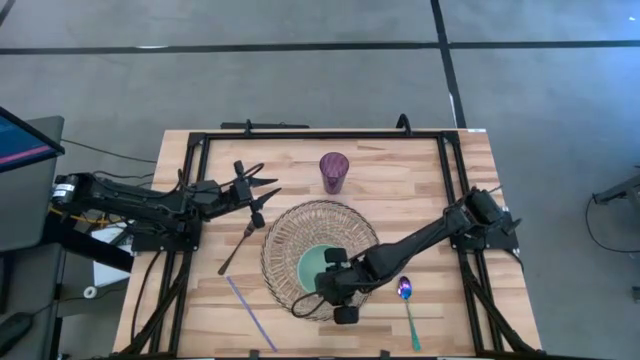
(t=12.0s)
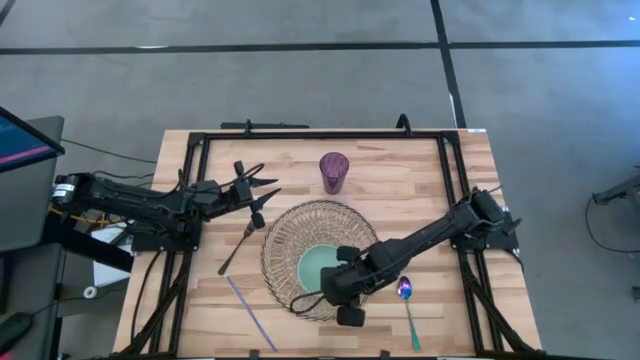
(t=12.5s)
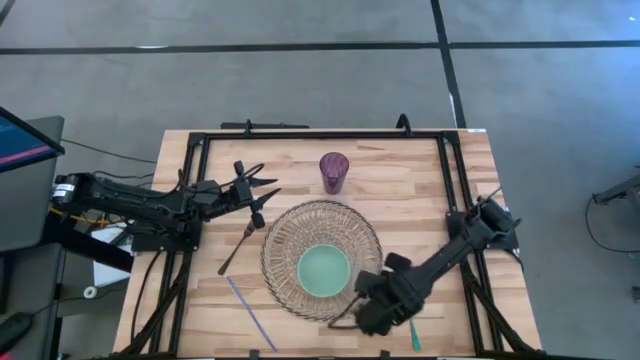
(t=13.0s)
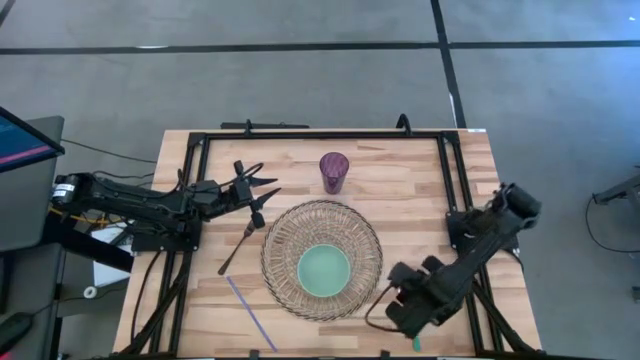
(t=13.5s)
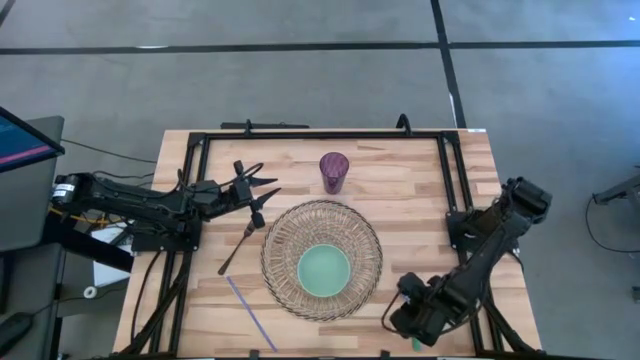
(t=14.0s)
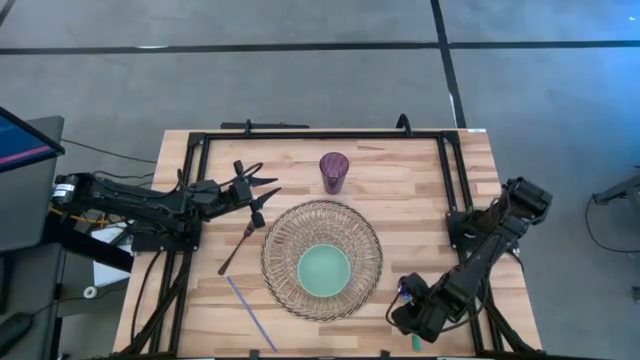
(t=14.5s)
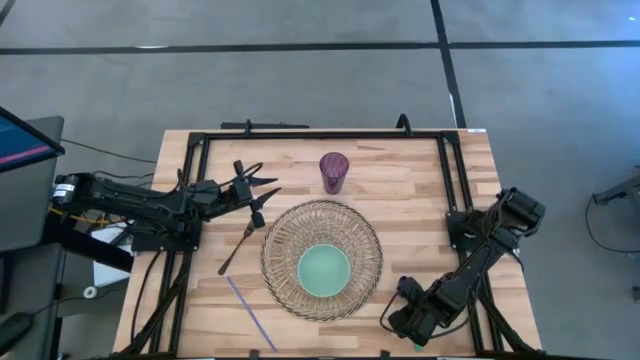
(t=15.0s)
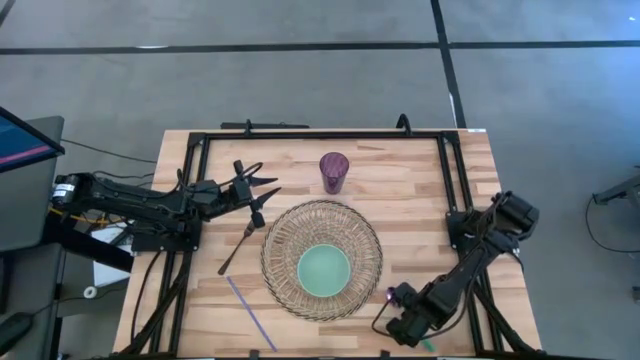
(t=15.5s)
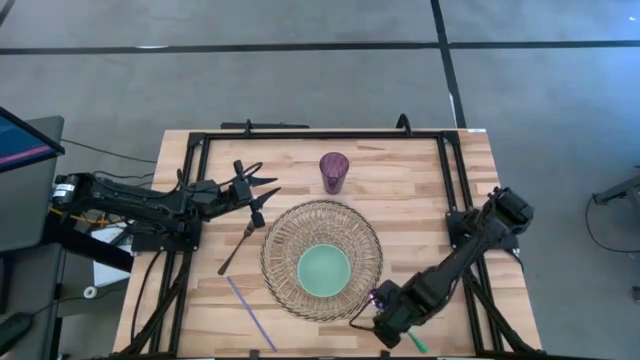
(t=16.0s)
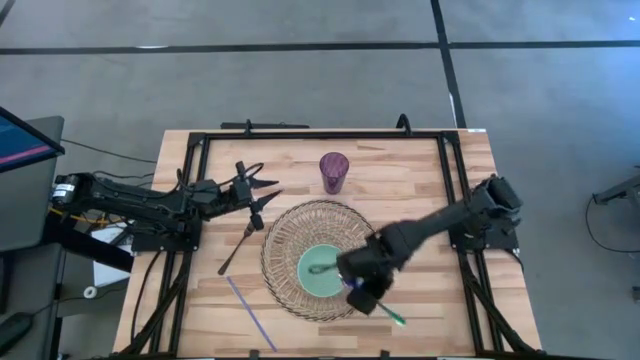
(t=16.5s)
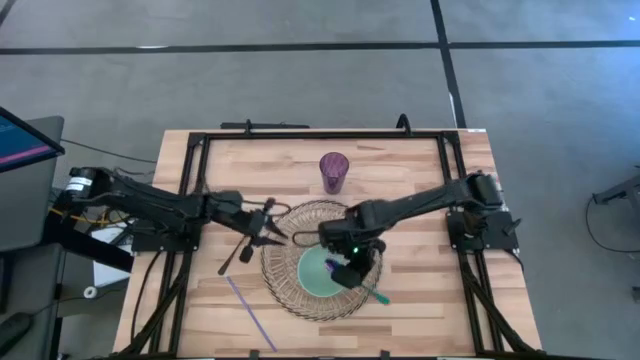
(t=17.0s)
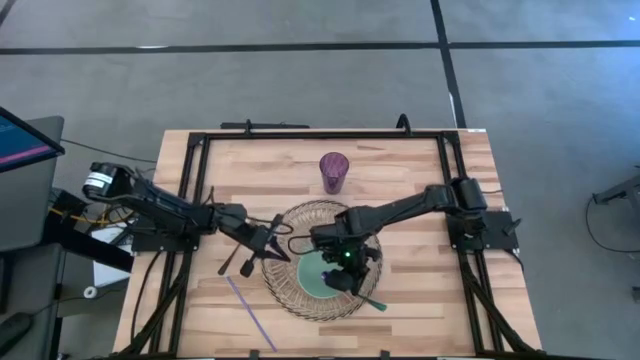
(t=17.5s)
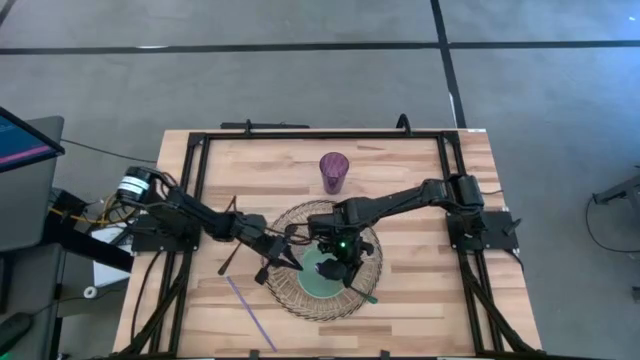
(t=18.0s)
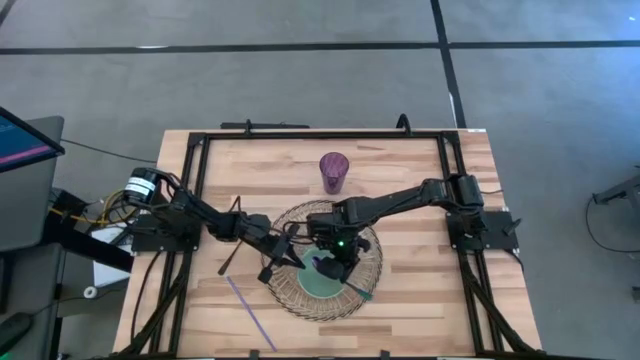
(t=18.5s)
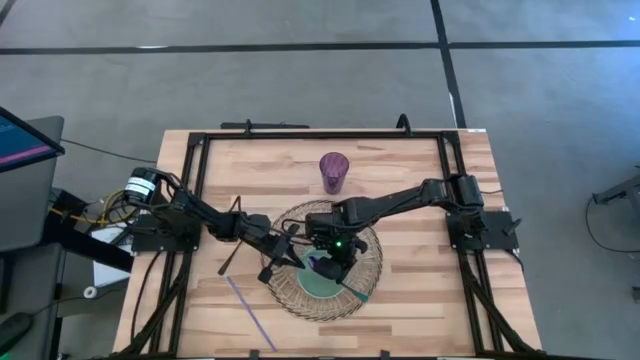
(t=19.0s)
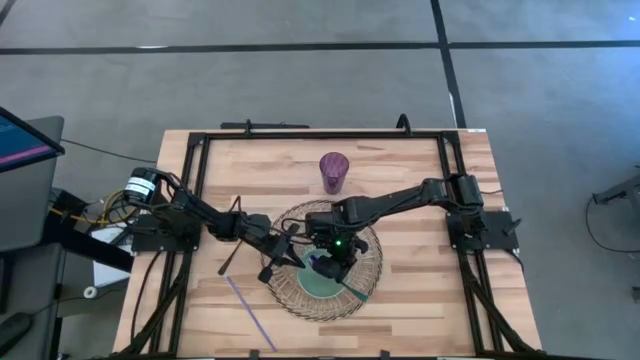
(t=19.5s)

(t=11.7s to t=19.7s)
Task: Pick & Place Utensil
Put the blue spoon into the green bowl

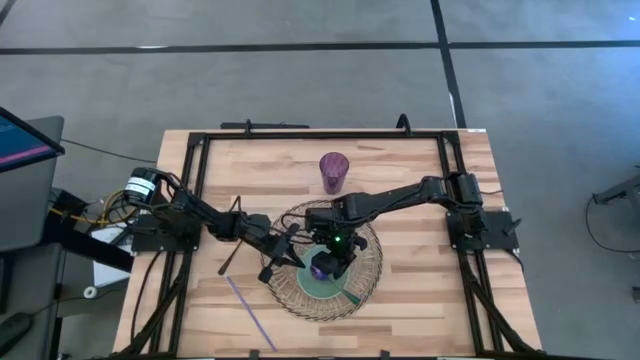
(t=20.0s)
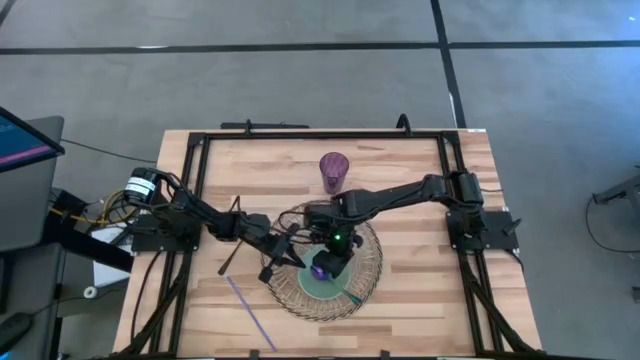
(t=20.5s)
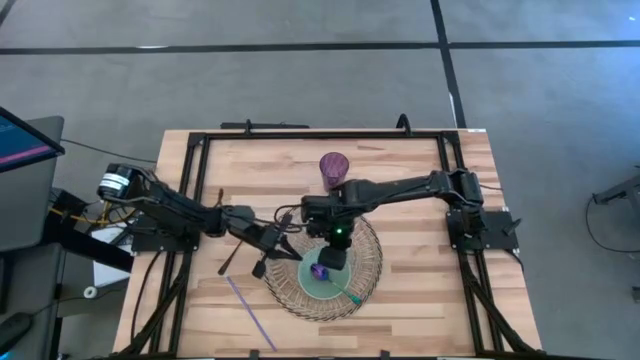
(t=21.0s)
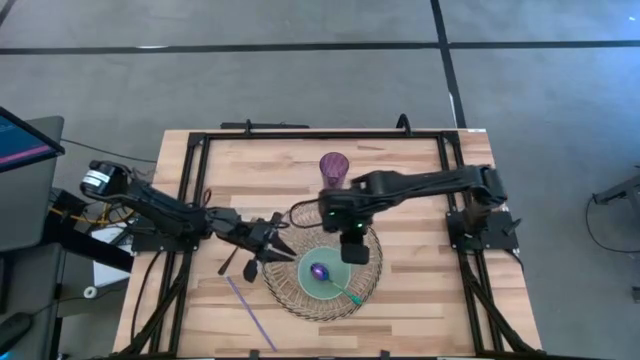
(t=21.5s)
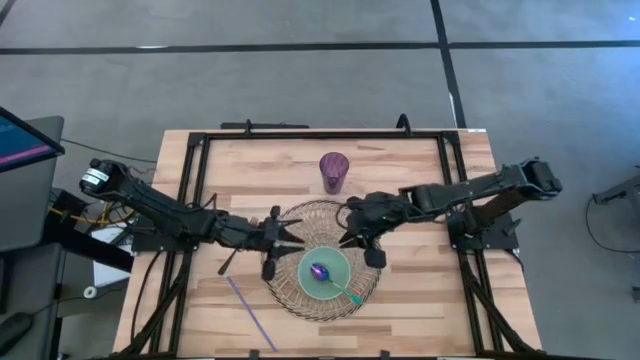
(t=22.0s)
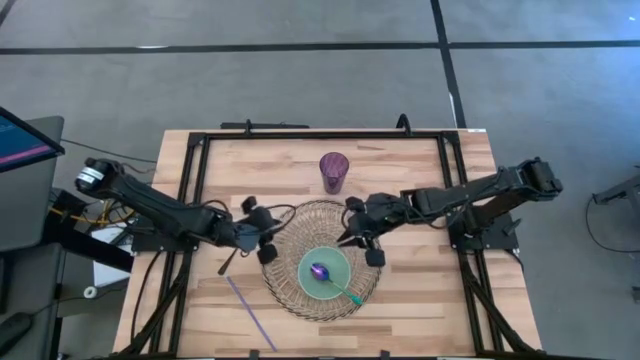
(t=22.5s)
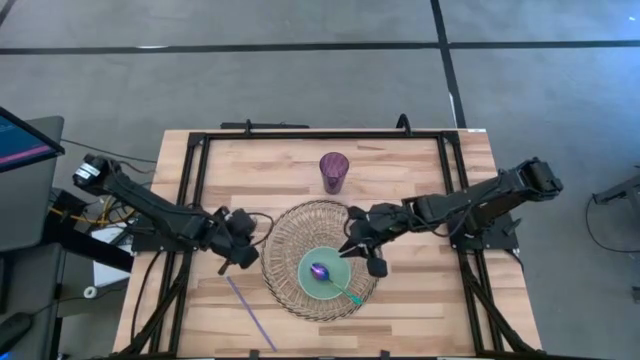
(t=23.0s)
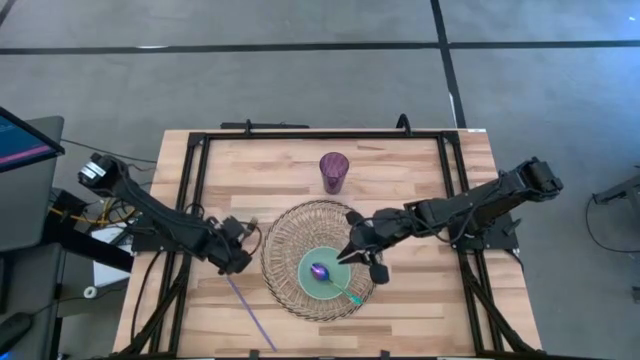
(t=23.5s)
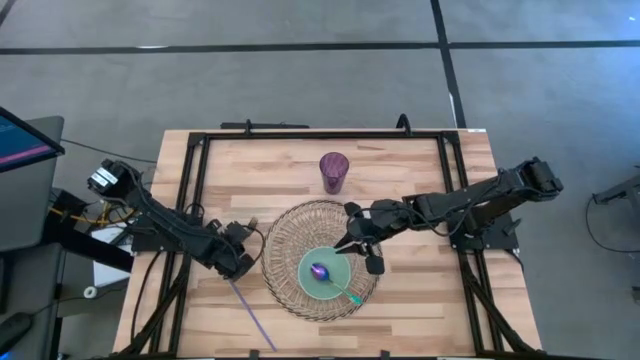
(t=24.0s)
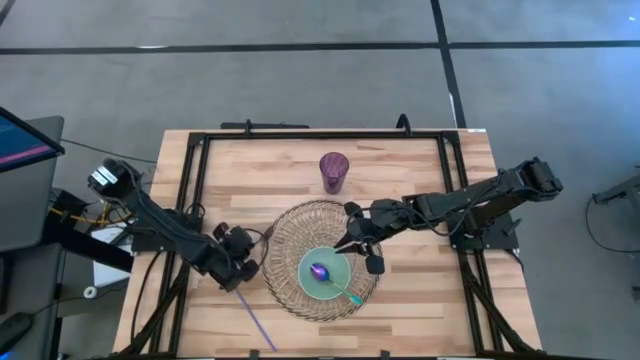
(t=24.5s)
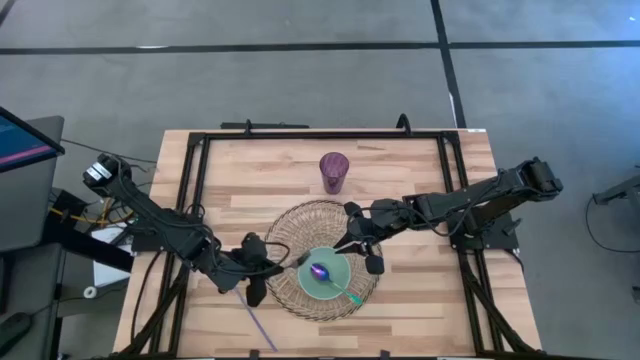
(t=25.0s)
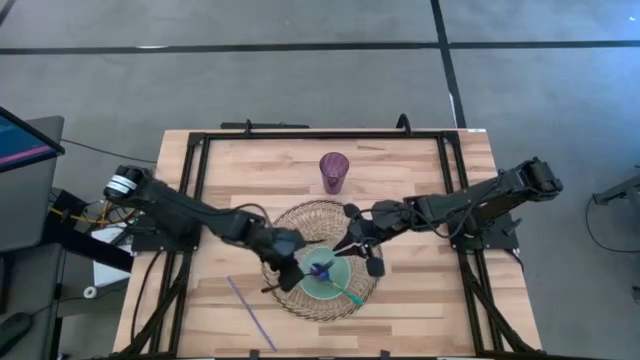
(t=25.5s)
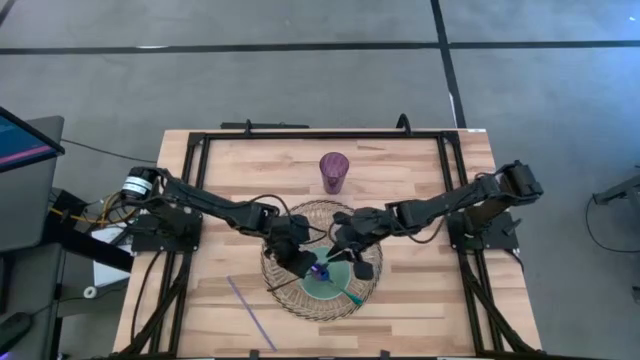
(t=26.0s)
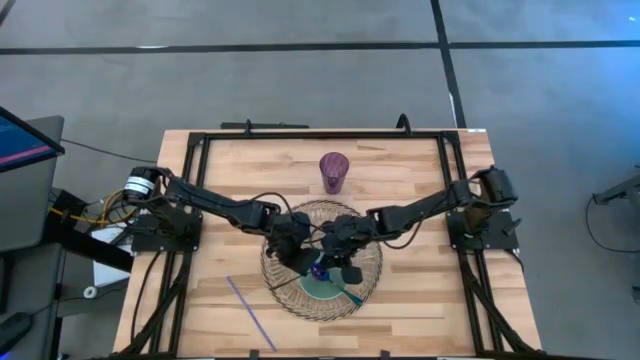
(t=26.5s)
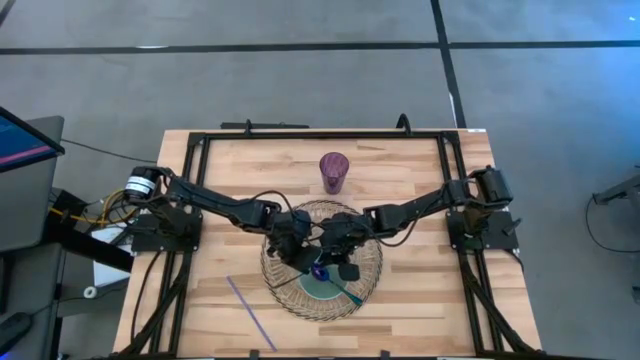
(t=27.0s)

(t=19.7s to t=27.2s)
Put the black fork into the green bowl

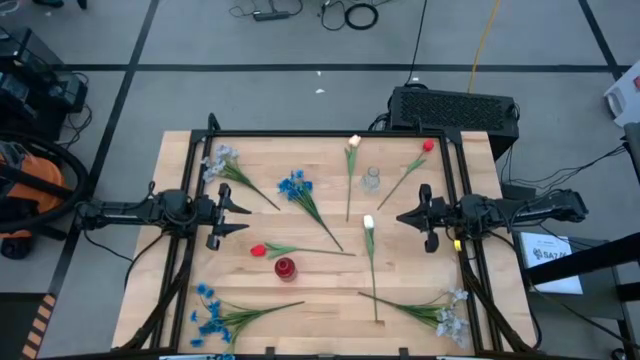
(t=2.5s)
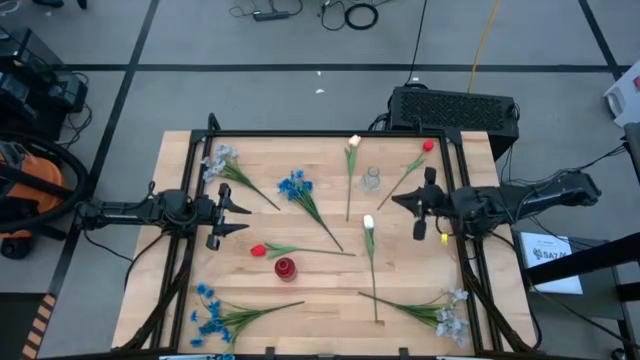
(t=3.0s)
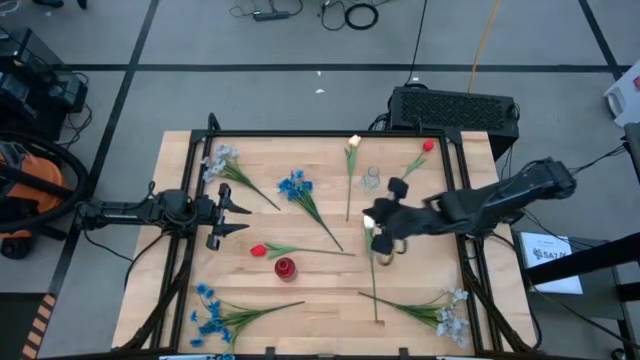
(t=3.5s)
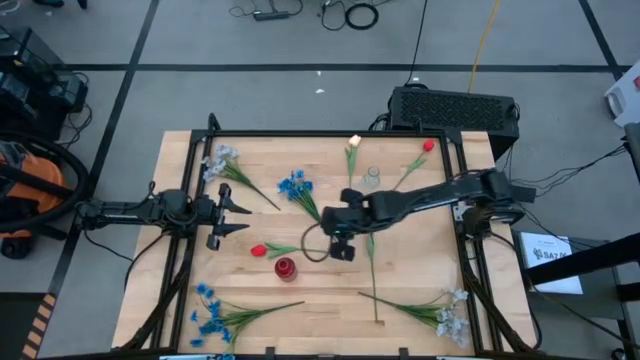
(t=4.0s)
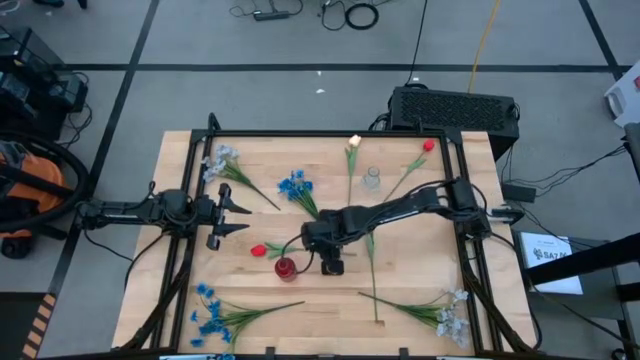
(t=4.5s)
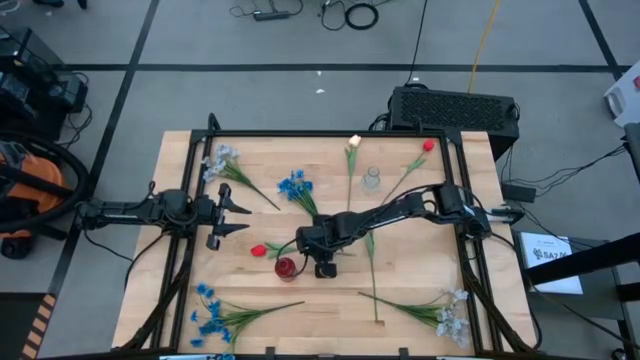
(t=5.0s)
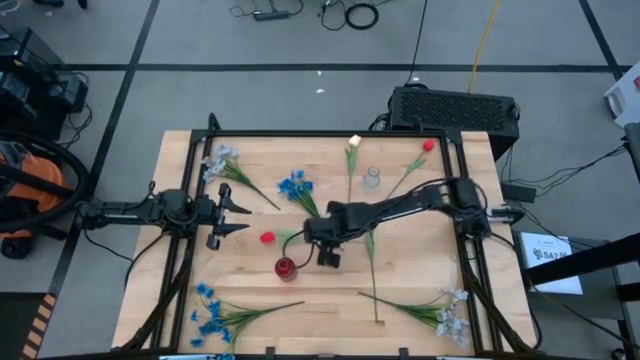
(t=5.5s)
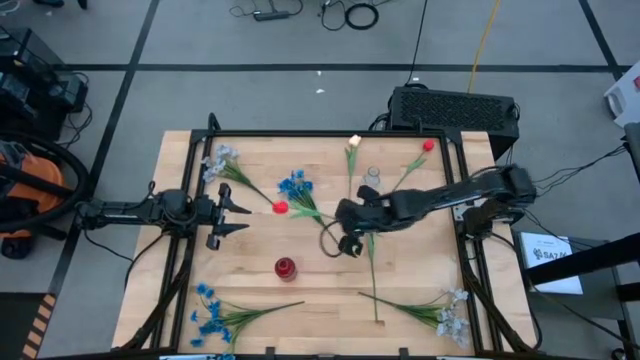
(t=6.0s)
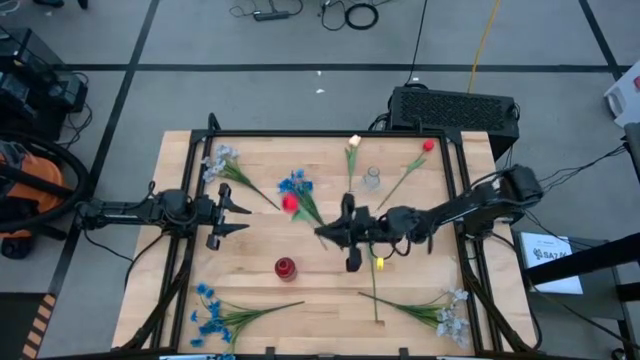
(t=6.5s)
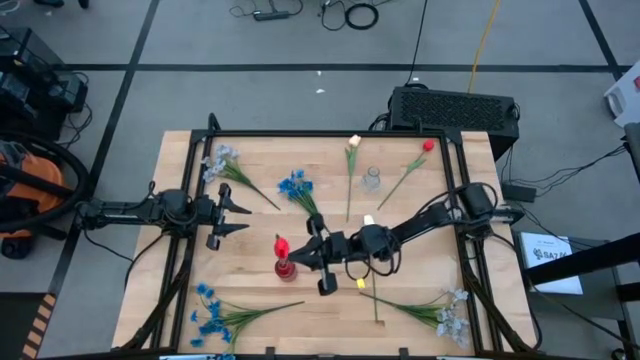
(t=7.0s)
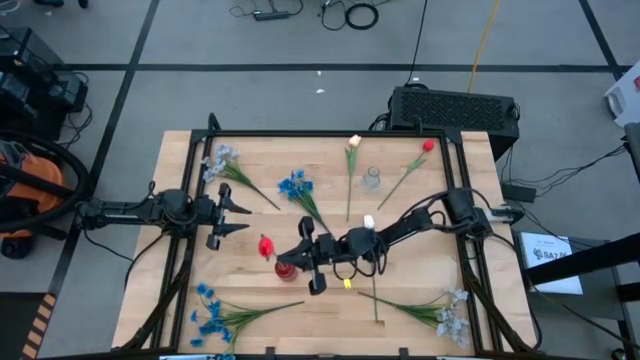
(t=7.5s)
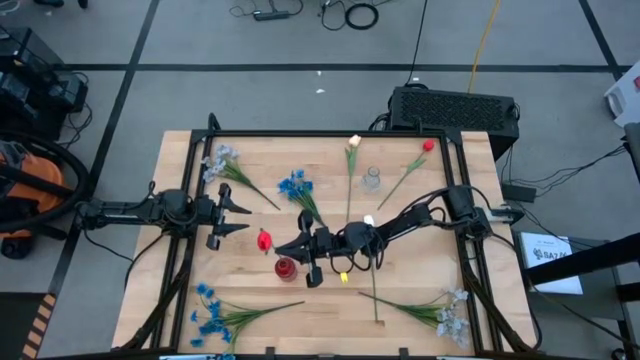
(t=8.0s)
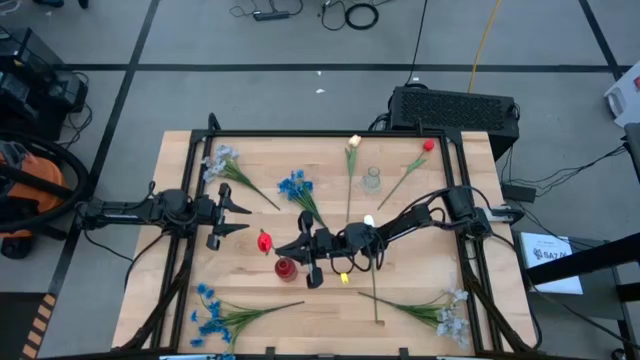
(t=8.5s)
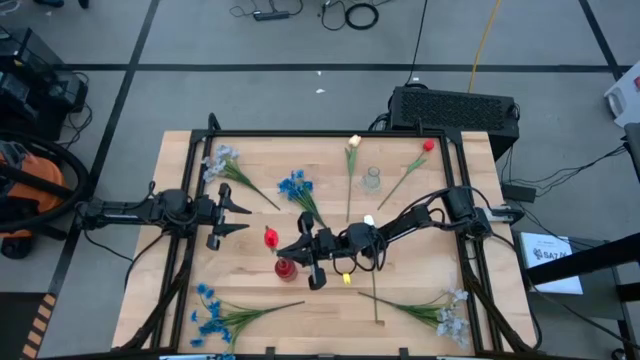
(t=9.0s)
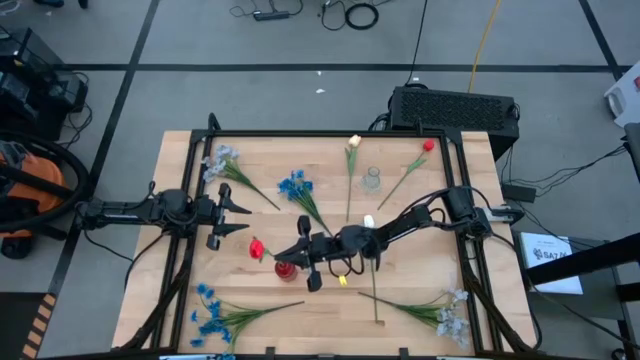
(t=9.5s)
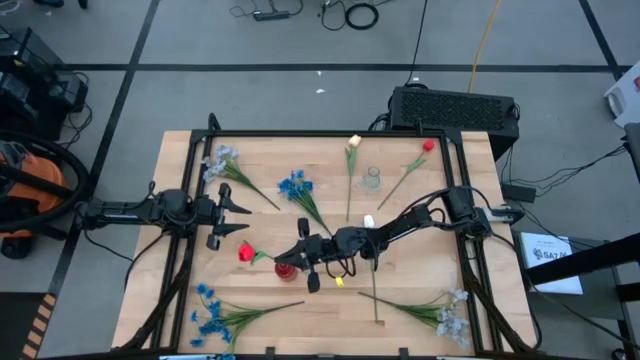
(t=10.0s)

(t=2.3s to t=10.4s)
Task: Sort flowers into vase by color
Put the bottom red tulip into the red vase
